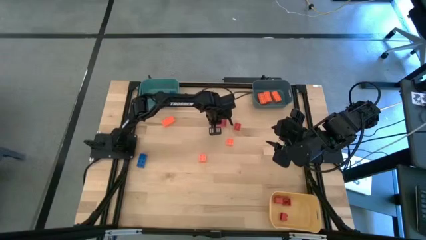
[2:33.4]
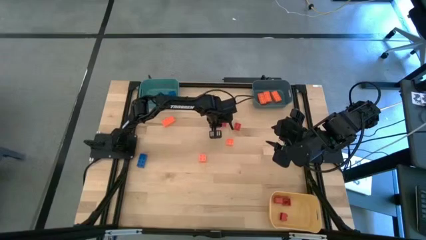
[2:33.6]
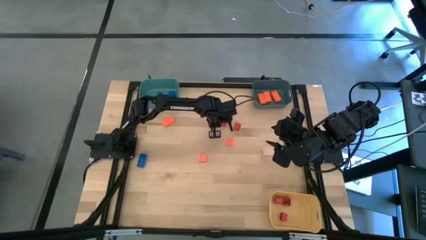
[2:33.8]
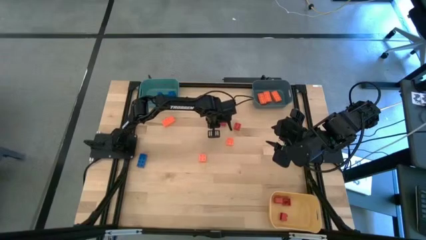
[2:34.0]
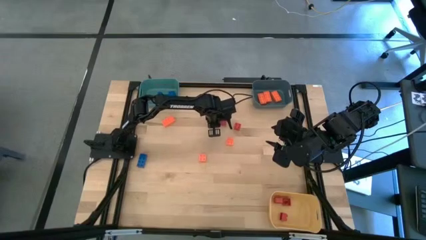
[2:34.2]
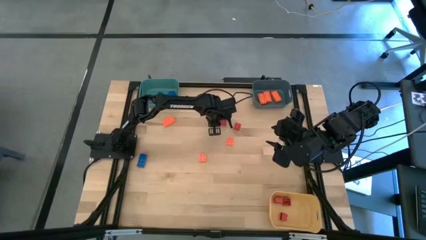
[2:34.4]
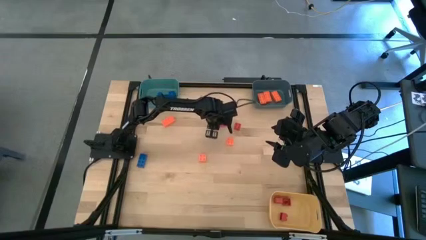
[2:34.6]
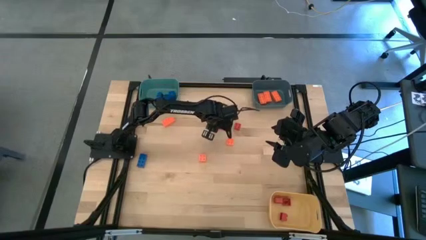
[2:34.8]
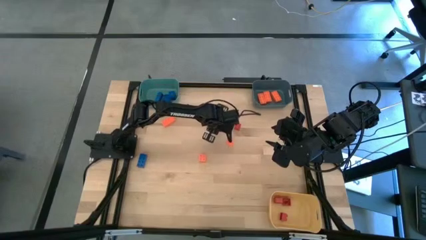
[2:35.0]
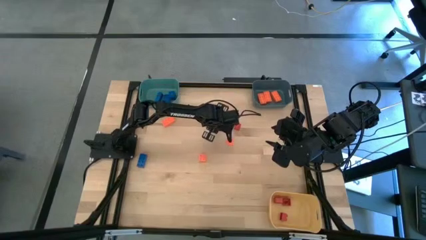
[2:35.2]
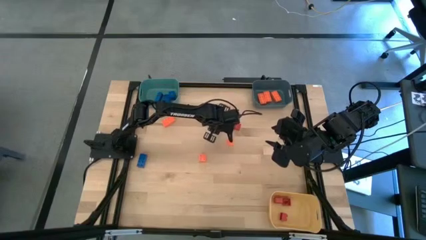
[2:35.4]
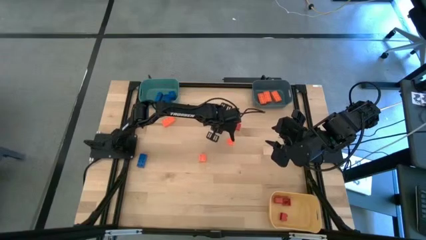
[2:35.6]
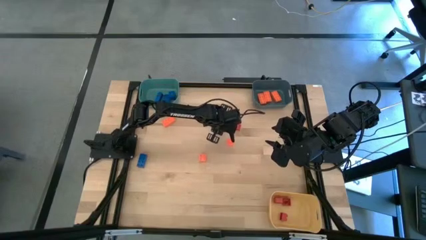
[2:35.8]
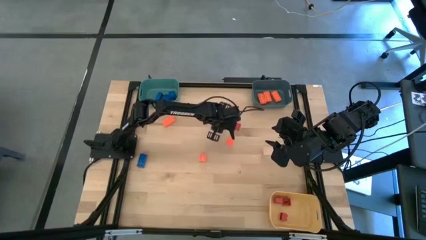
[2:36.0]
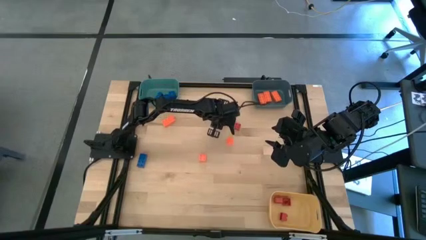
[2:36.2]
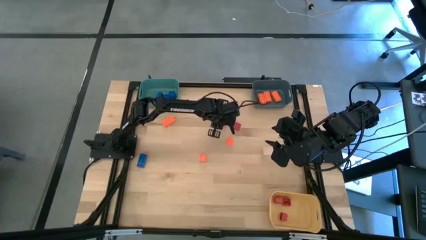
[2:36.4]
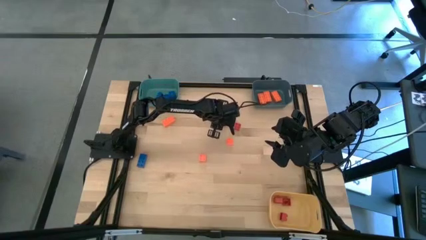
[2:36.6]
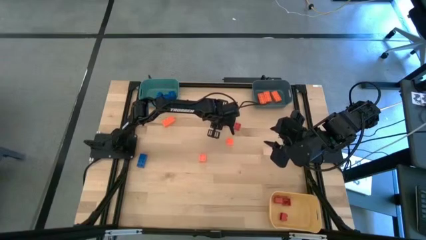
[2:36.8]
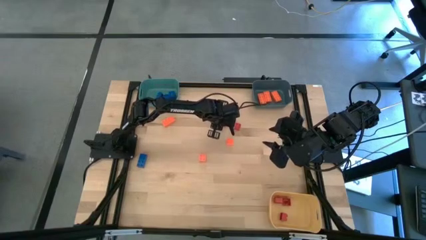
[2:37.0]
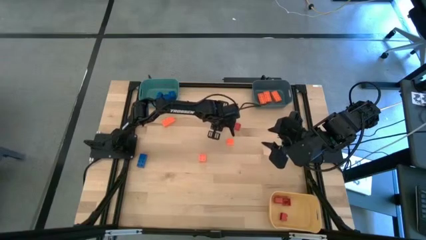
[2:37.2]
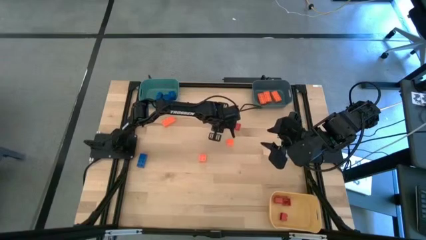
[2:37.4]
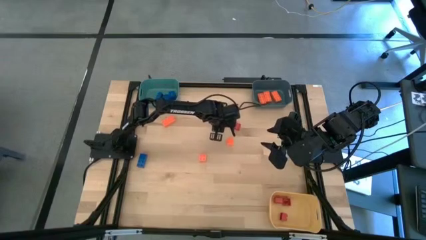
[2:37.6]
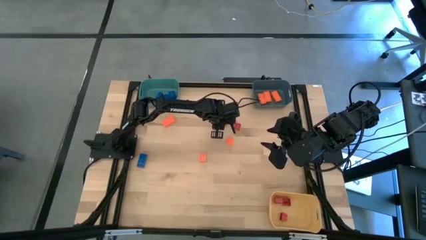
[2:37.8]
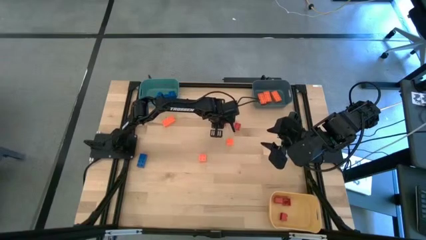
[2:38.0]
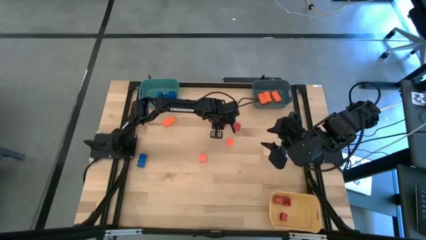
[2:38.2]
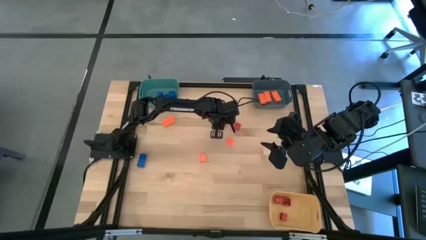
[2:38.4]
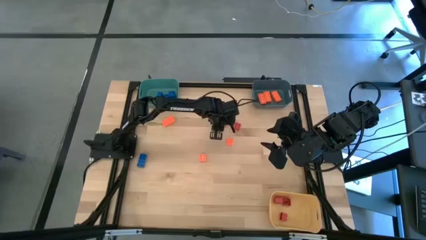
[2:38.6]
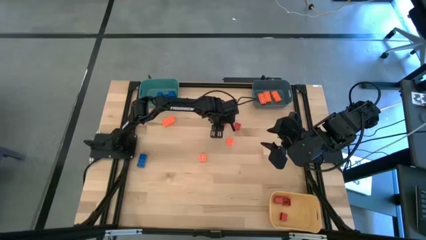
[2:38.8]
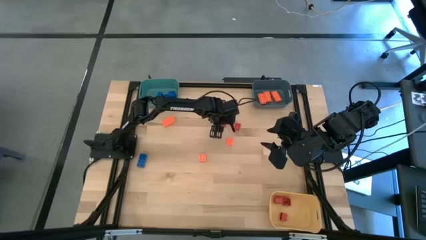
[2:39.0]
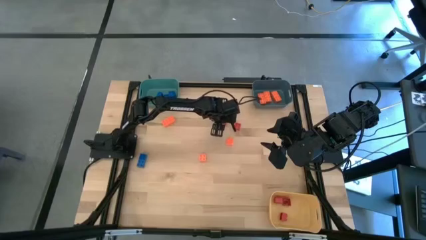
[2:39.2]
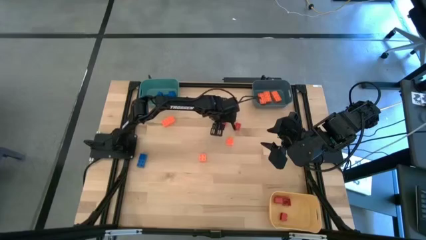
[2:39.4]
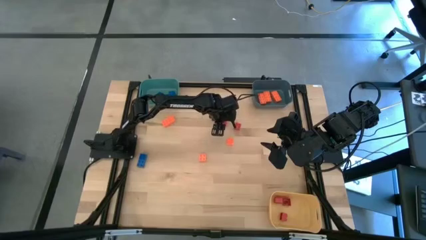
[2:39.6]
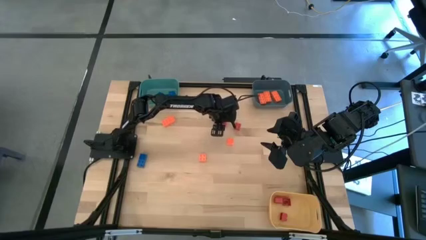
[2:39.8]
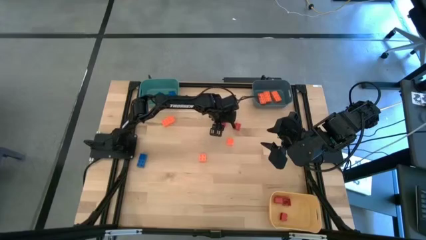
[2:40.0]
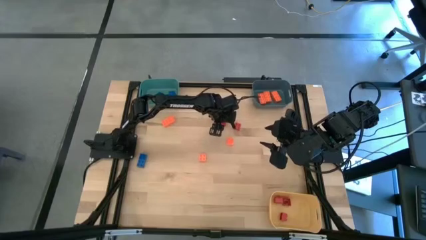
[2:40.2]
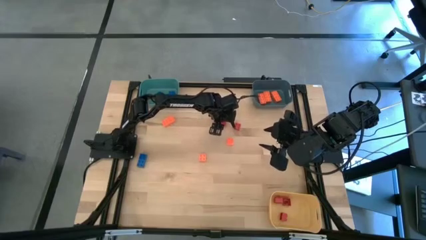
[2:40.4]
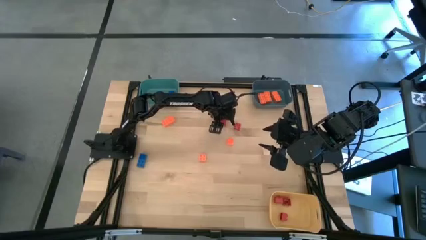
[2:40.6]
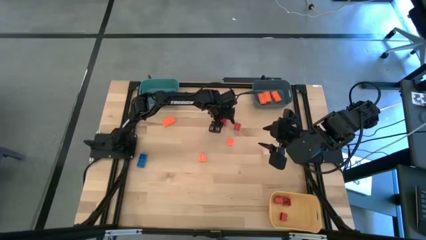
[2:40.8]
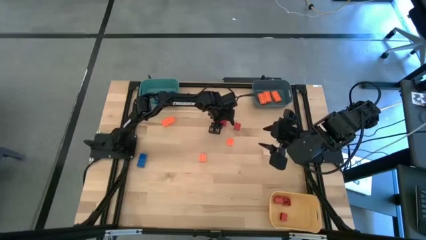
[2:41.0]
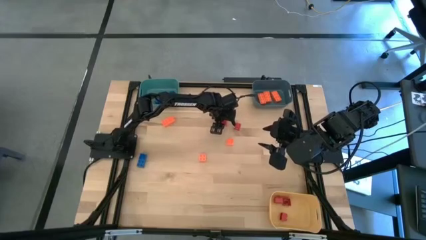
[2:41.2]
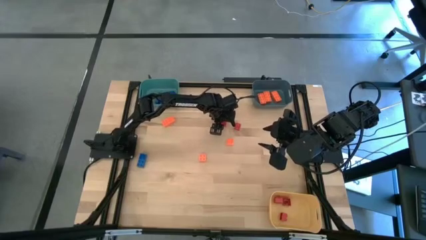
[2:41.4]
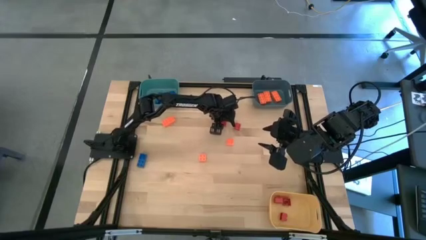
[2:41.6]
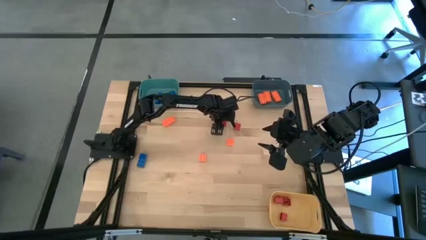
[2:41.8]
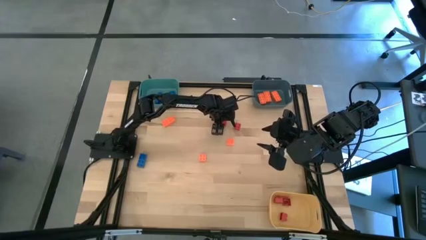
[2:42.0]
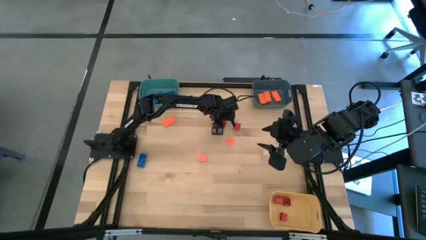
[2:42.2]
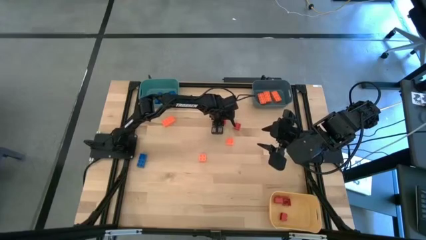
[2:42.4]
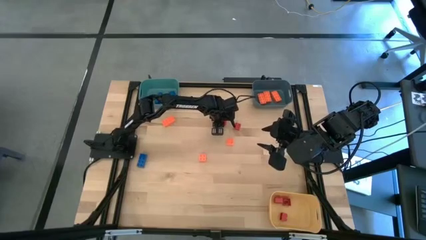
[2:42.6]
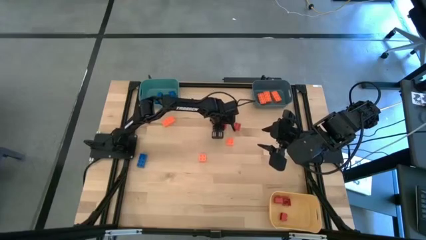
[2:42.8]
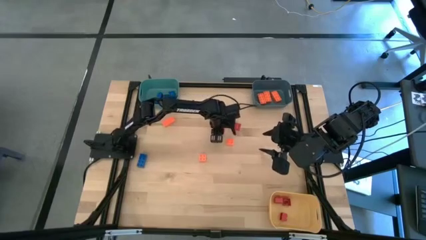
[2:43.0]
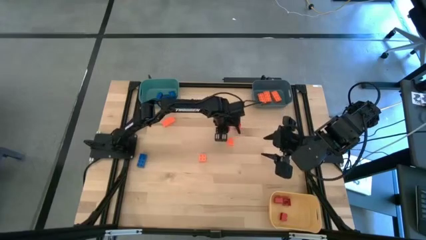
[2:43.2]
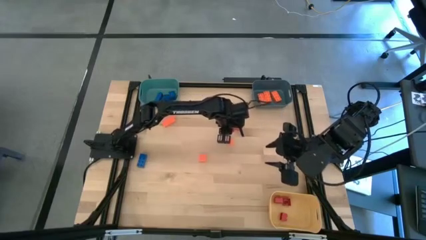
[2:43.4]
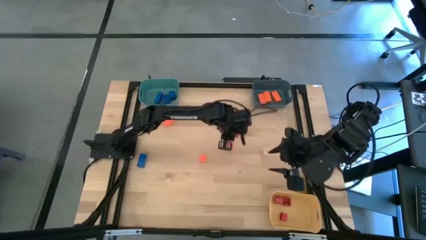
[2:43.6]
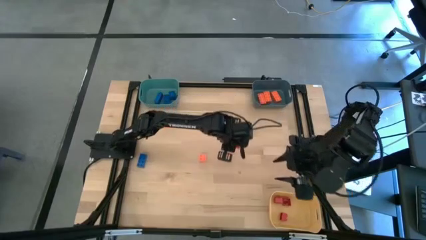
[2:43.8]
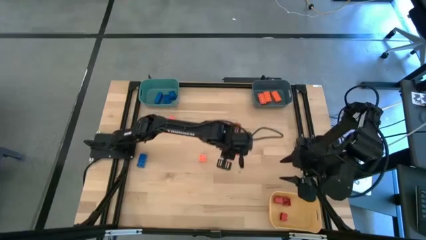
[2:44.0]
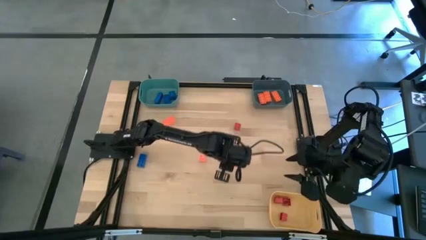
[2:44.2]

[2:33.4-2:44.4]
Task: Sort & place blocks by color
Put the red game piece into the yellow bin
